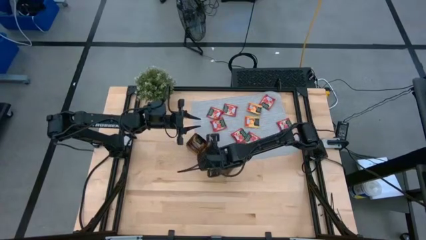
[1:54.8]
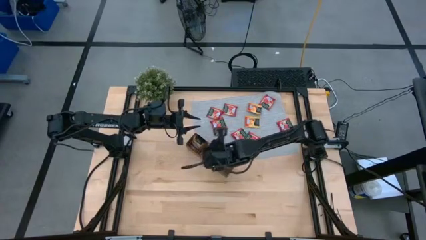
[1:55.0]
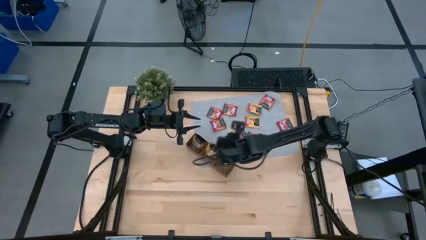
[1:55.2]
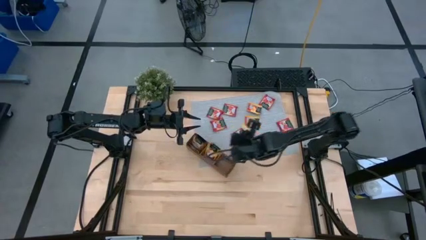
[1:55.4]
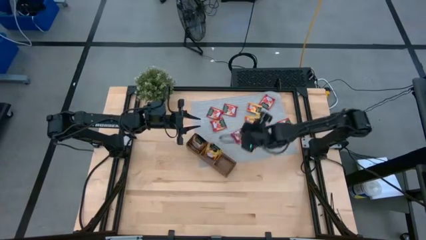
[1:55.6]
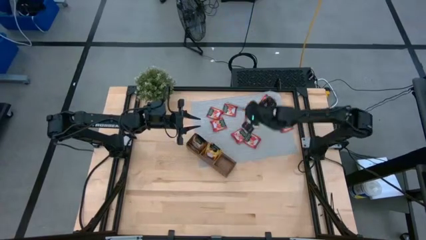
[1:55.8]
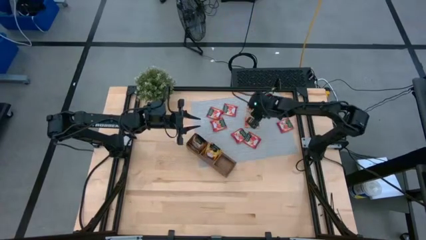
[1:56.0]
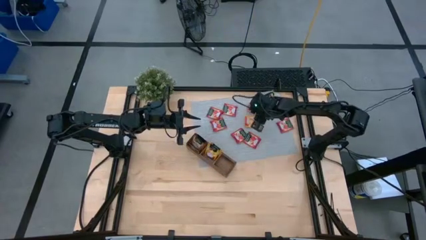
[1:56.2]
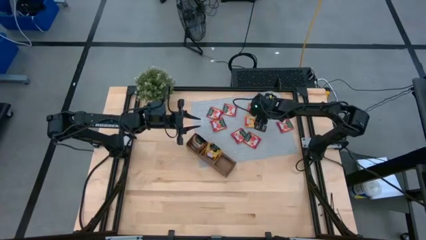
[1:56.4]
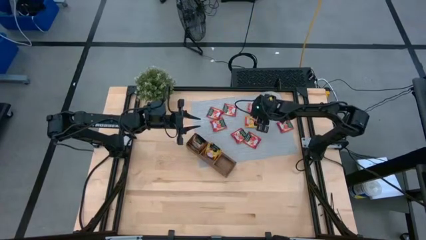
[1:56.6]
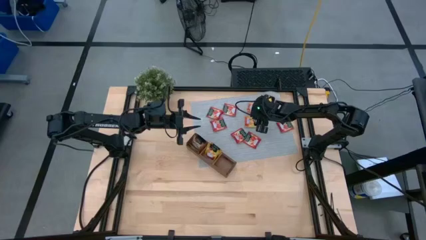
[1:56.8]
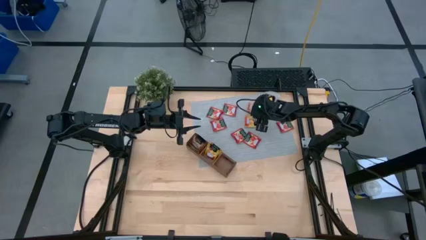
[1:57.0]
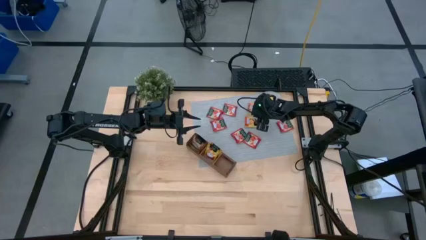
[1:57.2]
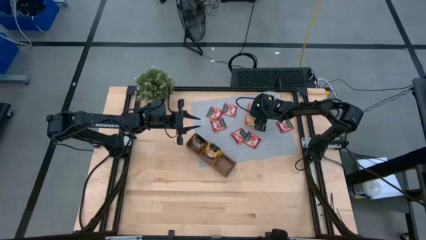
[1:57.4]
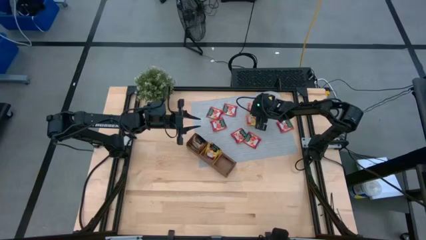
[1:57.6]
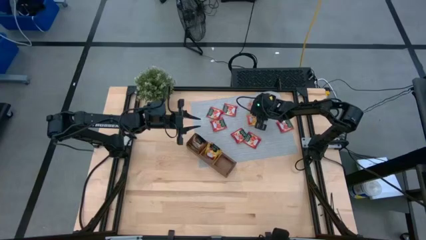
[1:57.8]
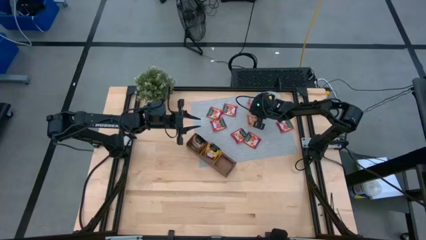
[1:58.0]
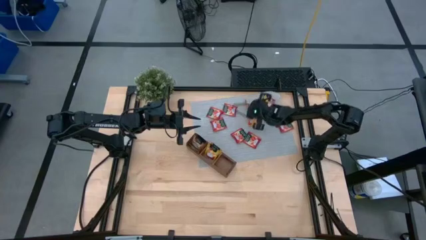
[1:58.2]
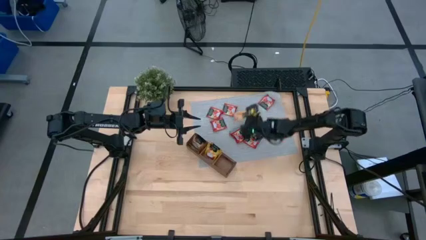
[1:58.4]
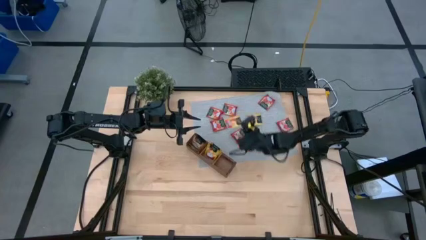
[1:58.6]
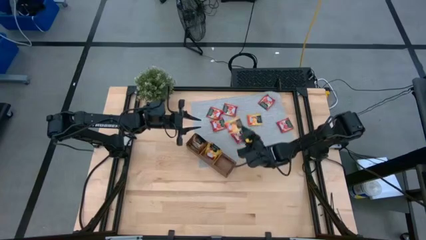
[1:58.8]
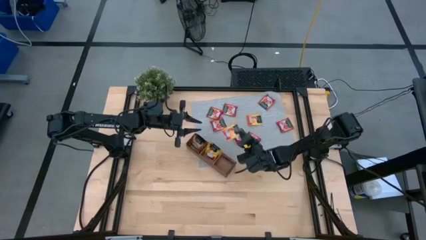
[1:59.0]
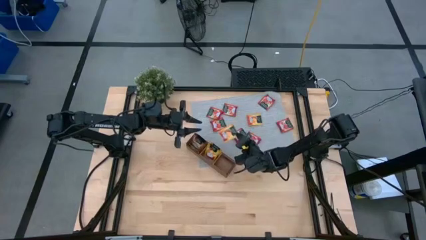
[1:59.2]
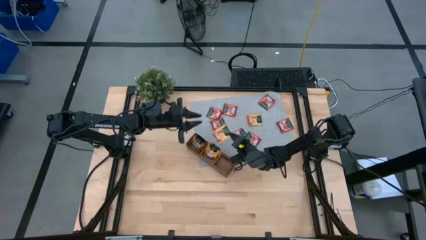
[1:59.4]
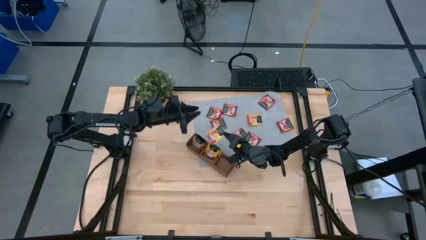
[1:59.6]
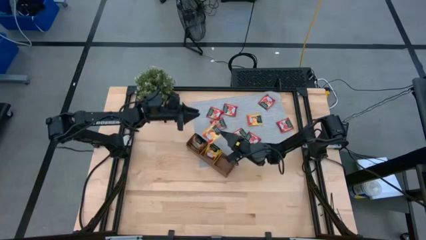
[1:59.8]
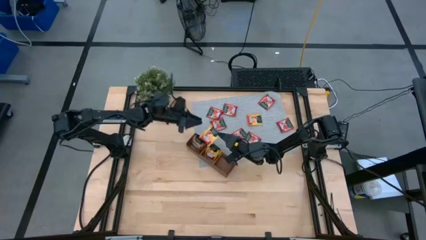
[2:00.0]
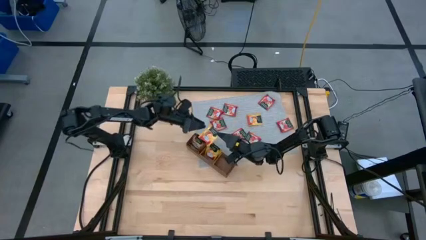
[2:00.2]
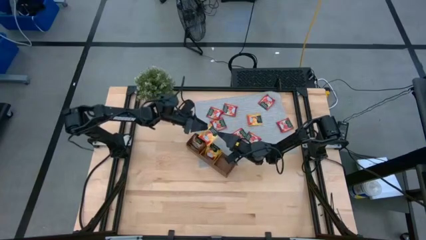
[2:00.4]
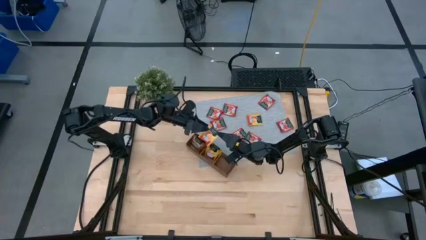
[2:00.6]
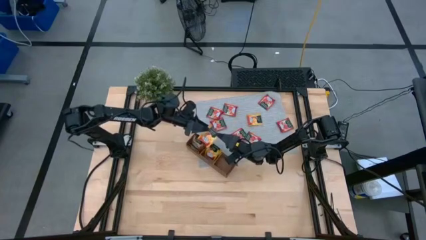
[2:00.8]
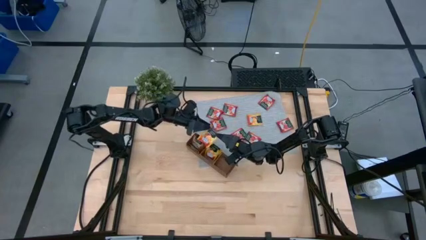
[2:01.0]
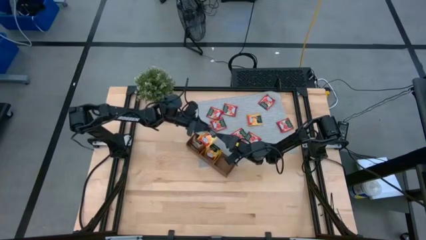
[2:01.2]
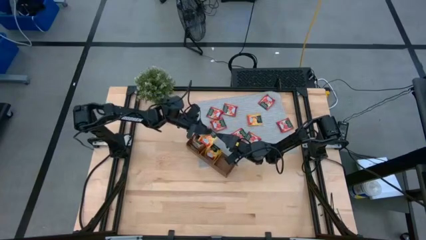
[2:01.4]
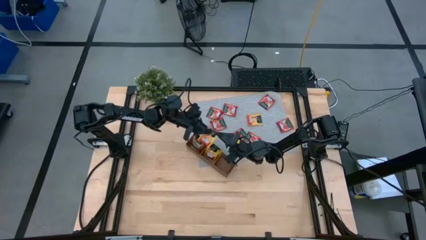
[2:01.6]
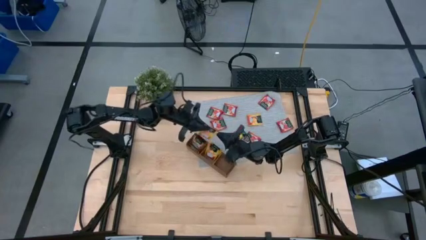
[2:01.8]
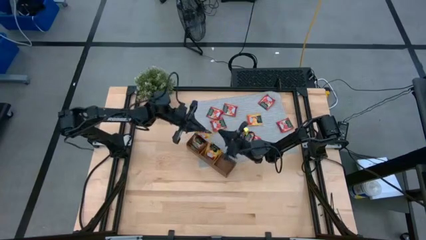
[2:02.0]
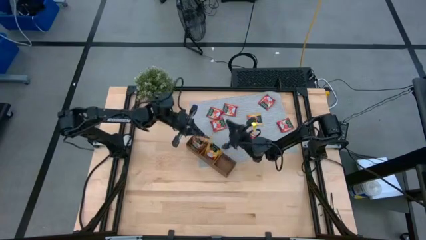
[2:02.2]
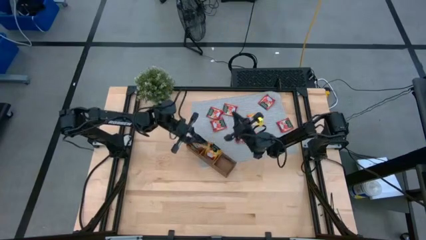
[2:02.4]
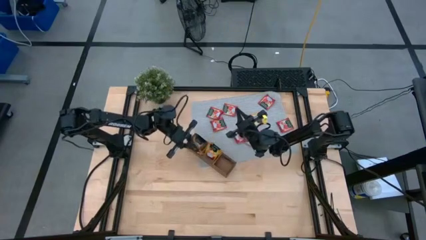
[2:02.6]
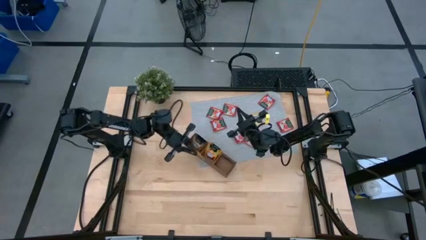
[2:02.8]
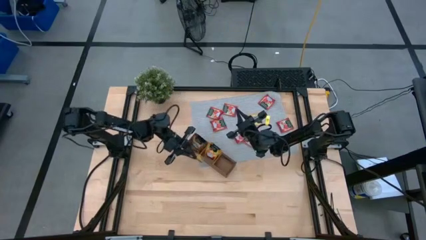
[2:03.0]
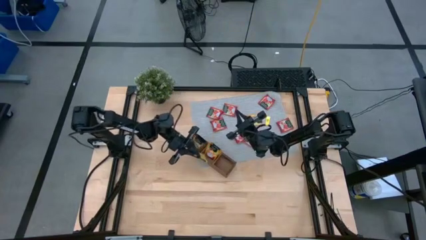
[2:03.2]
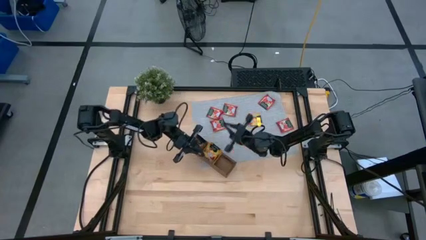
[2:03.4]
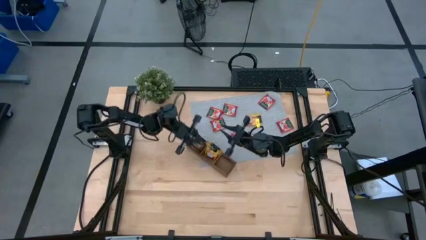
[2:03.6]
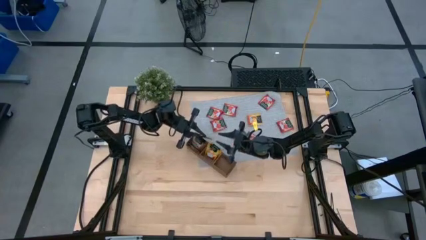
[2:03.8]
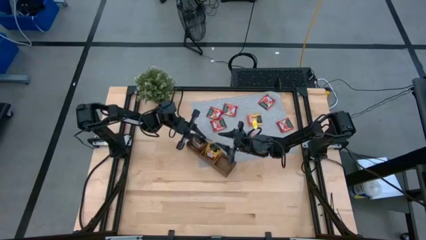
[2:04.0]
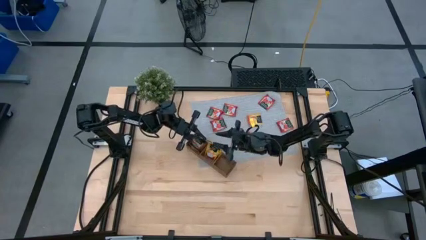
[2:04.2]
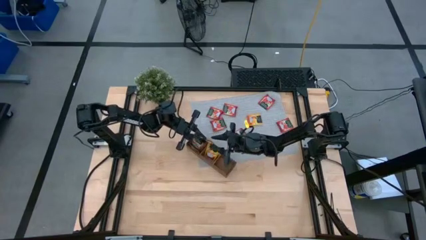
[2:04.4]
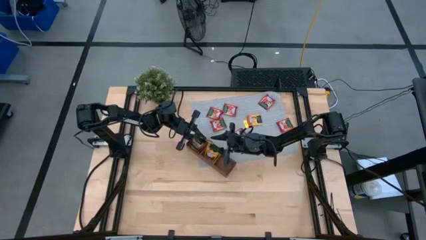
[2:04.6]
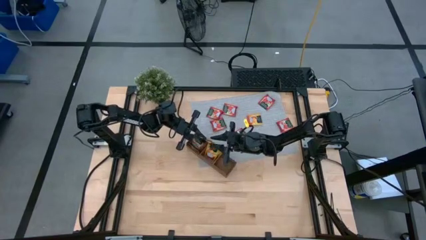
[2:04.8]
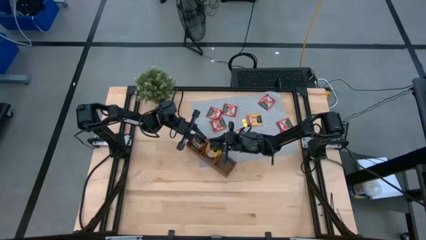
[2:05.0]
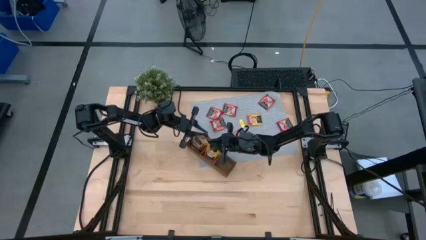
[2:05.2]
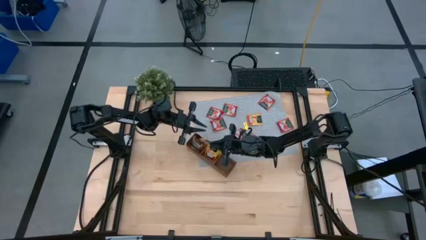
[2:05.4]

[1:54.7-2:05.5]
Task: Pick & Place Tea
Put the yellow tea bag into the middle section of the wooden organizer

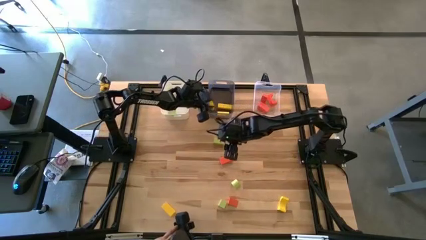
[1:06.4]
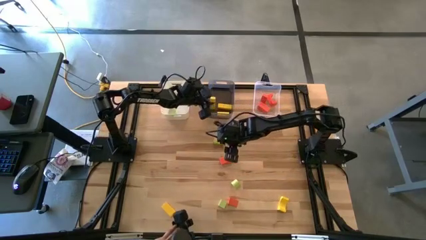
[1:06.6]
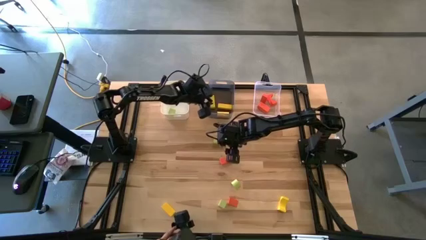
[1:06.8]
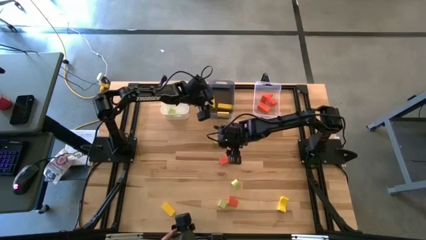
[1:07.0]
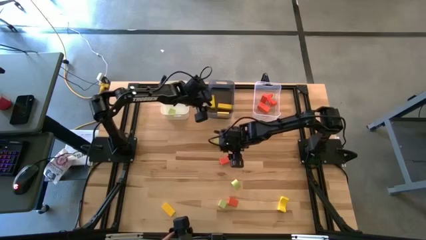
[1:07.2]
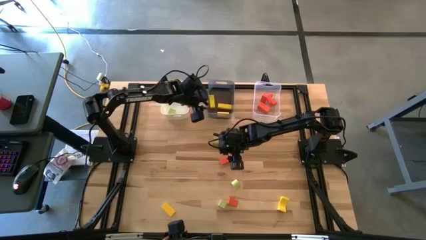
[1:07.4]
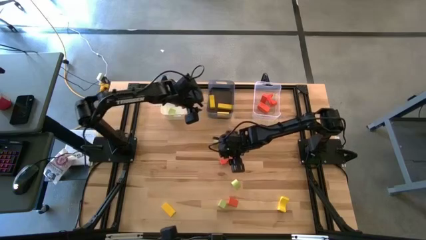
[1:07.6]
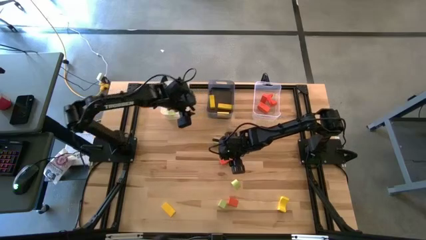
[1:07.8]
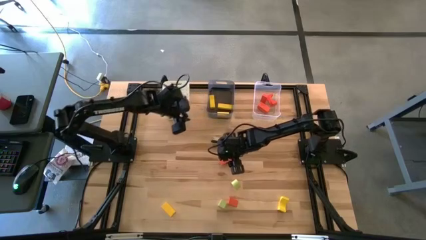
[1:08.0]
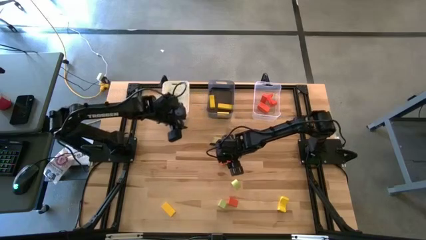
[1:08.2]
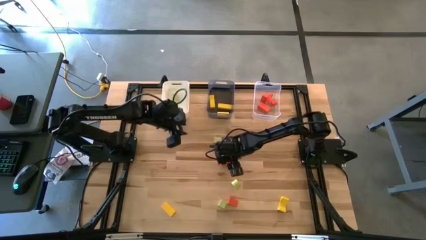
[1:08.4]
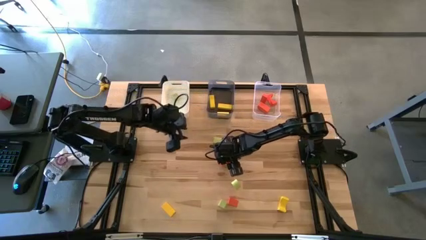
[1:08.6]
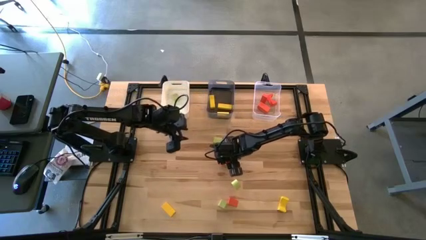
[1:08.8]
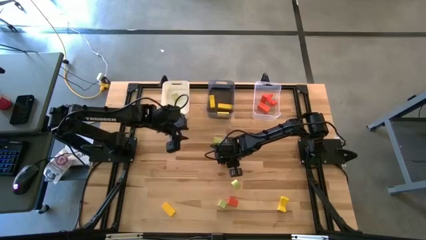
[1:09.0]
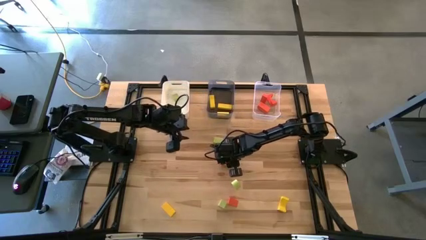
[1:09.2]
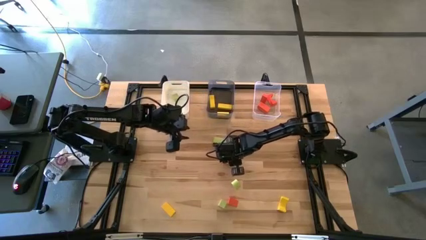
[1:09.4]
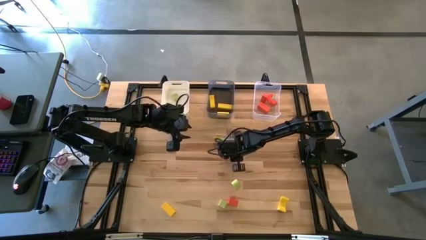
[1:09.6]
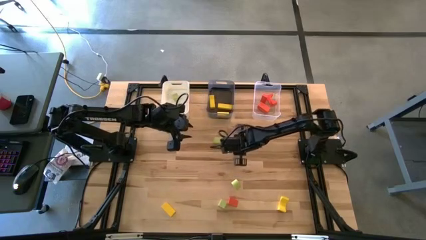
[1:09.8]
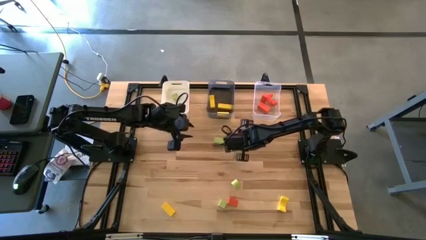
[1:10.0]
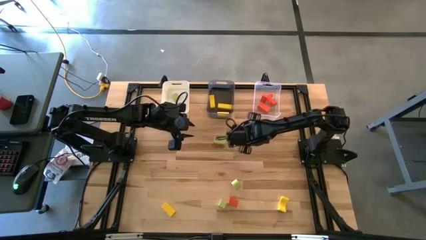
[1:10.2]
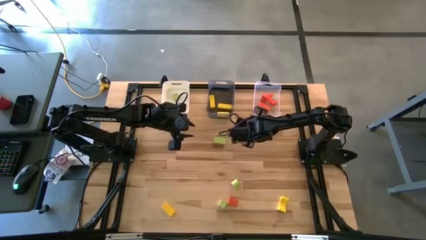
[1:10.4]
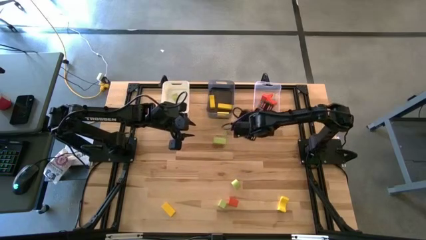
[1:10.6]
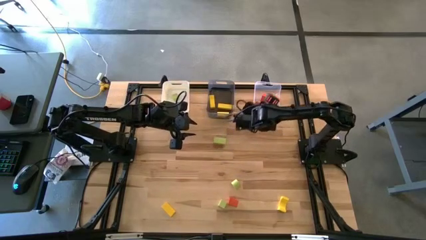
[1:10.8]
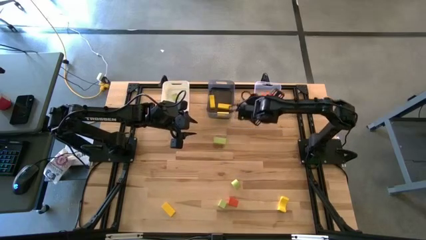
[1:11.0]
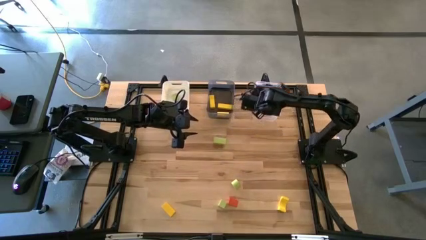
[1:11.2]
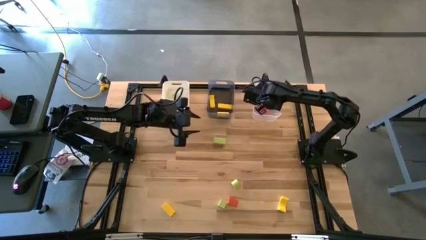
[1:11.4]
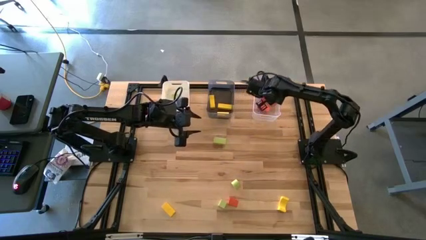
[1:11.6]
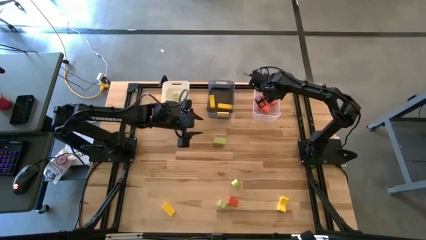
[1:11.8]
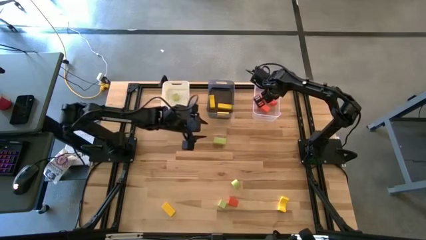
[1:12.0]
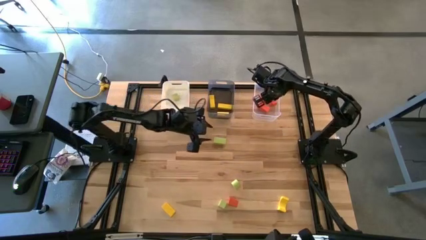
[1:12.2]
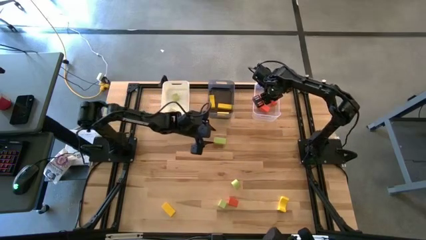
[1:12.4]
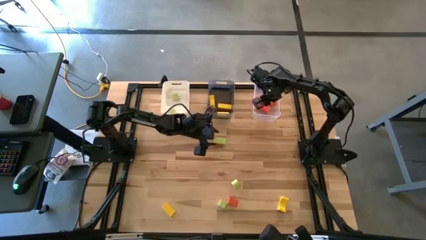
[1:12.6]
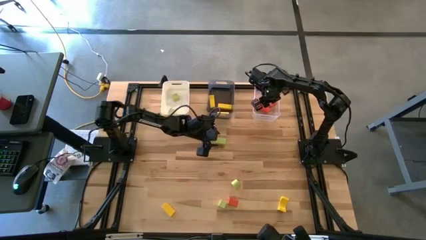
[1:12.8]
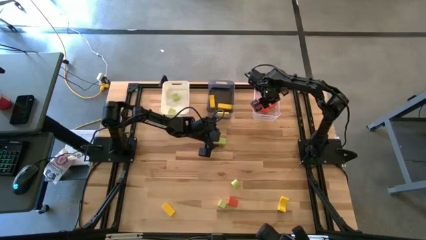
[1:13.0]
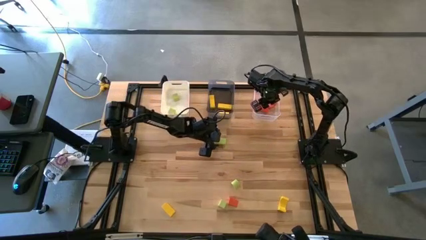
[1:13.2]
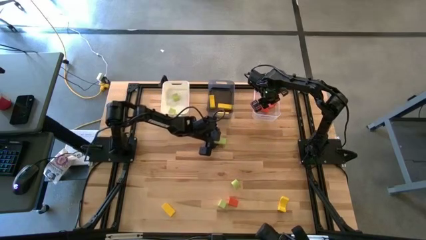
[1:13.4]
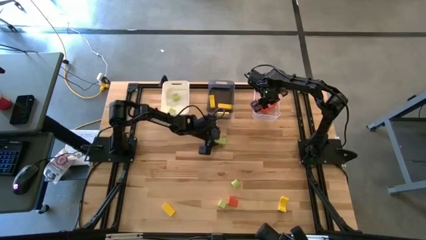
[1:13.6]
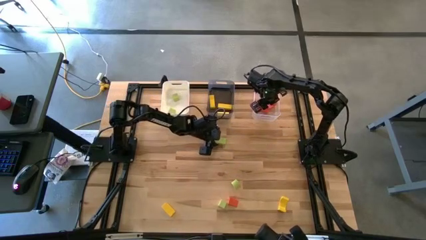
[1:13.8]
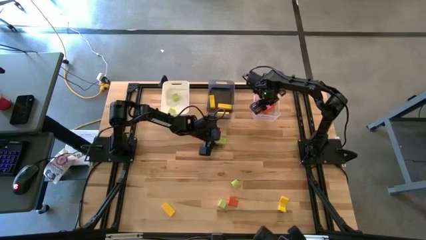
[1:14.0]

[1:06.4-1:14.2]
Task: Sort & place blocks by color
Put the orange block into the transparent bin
